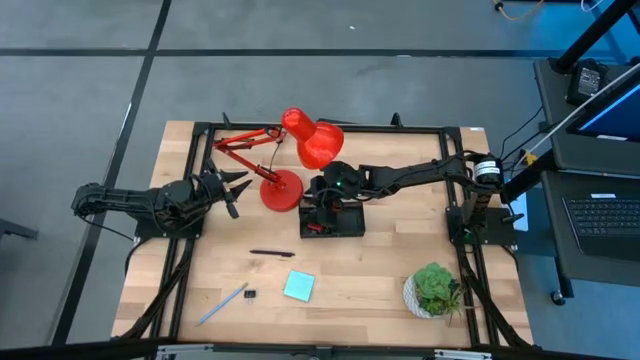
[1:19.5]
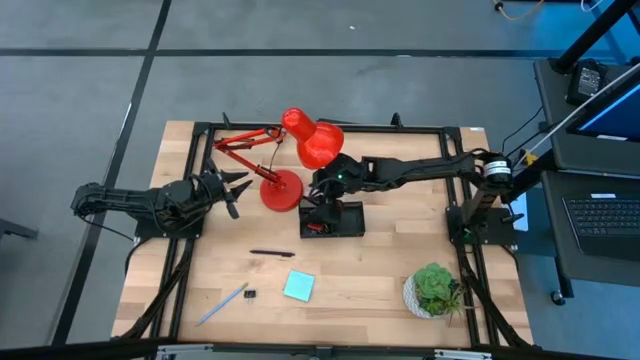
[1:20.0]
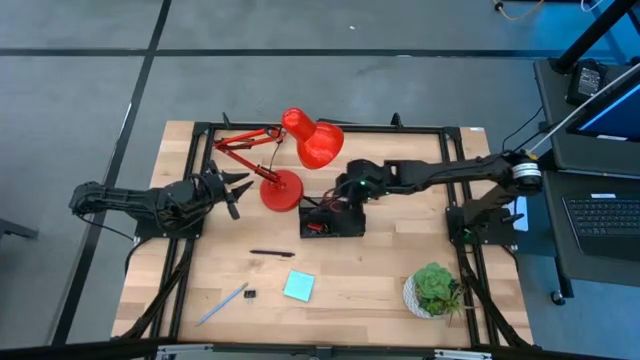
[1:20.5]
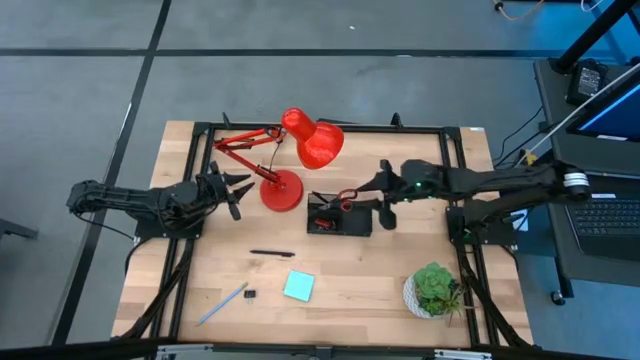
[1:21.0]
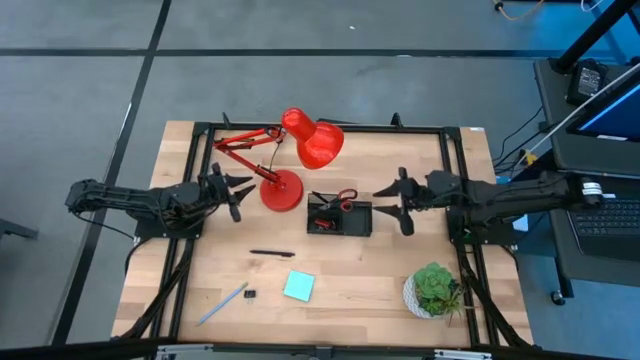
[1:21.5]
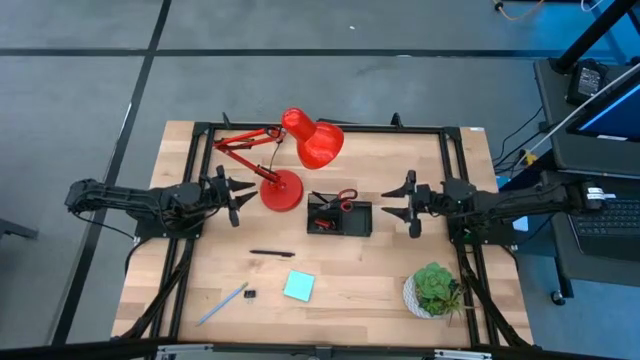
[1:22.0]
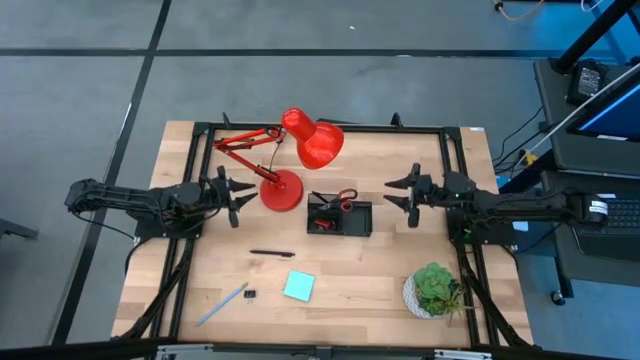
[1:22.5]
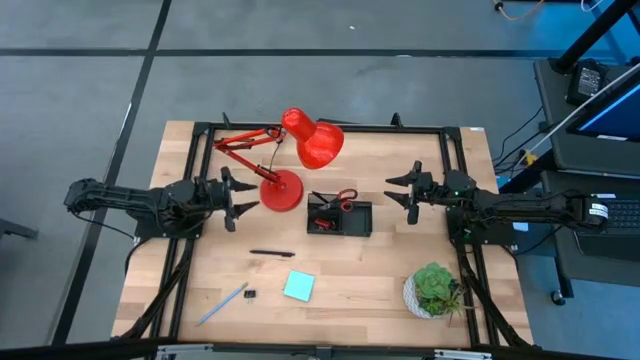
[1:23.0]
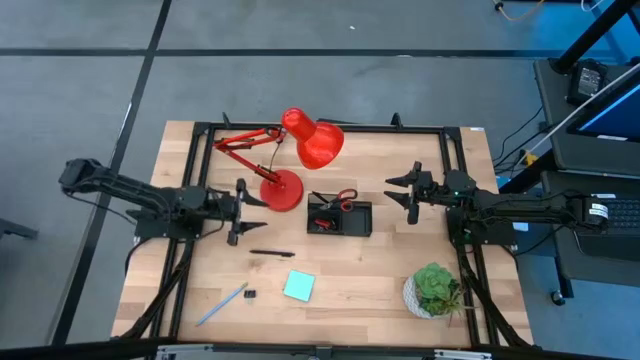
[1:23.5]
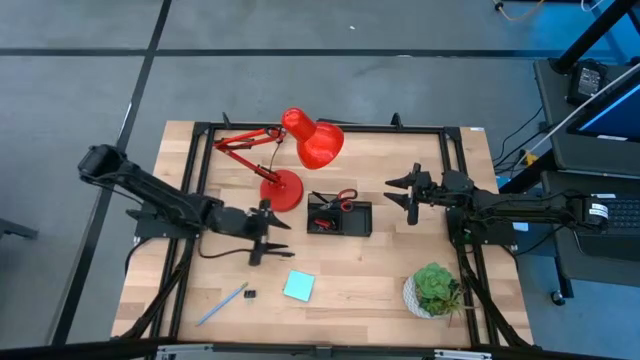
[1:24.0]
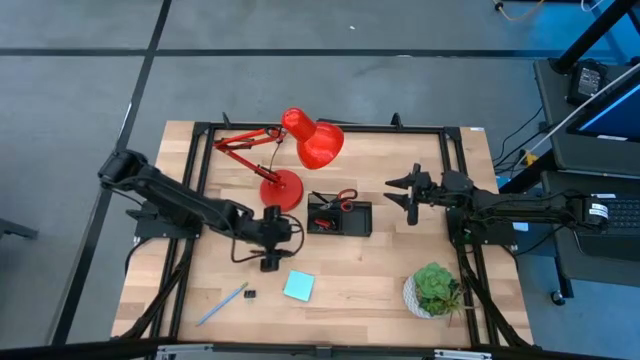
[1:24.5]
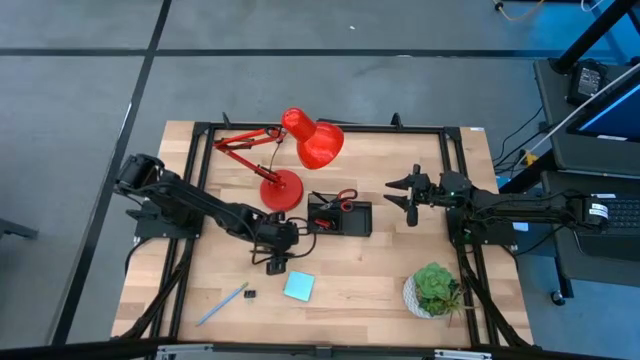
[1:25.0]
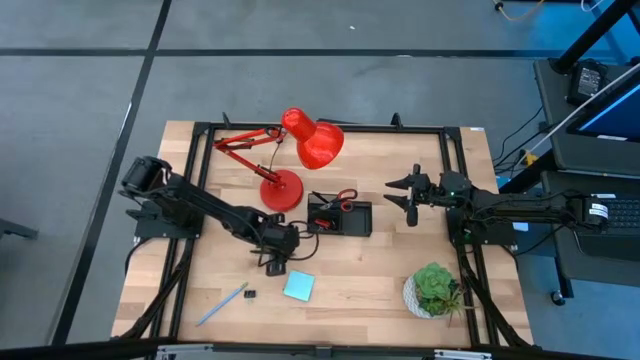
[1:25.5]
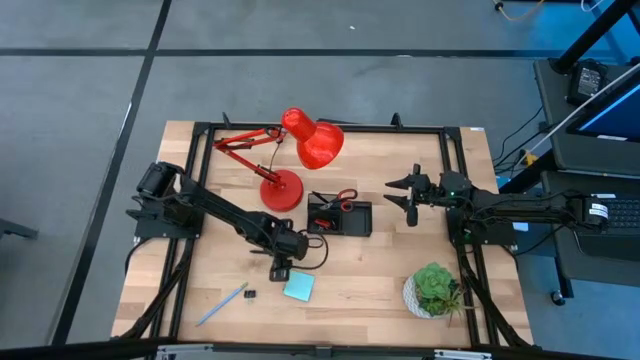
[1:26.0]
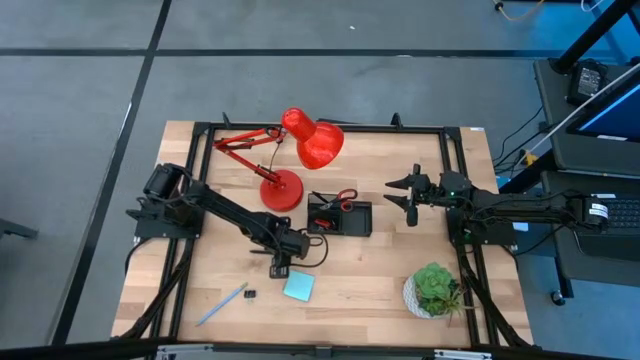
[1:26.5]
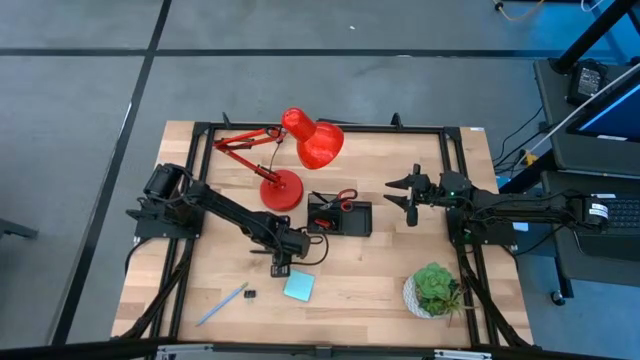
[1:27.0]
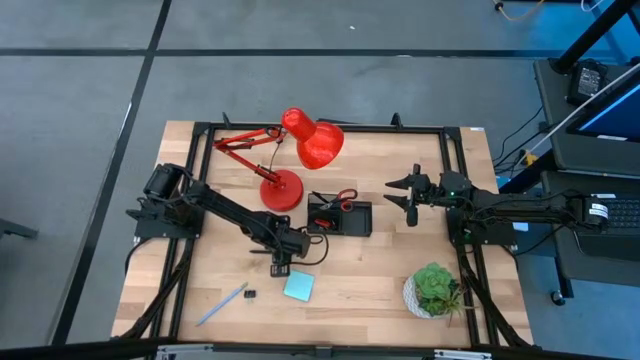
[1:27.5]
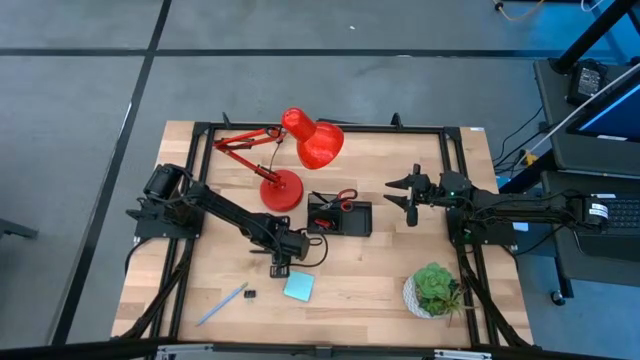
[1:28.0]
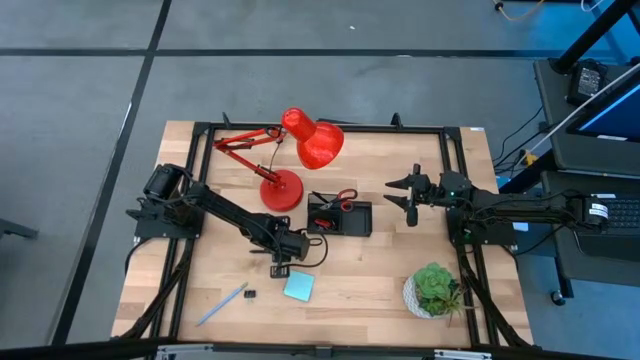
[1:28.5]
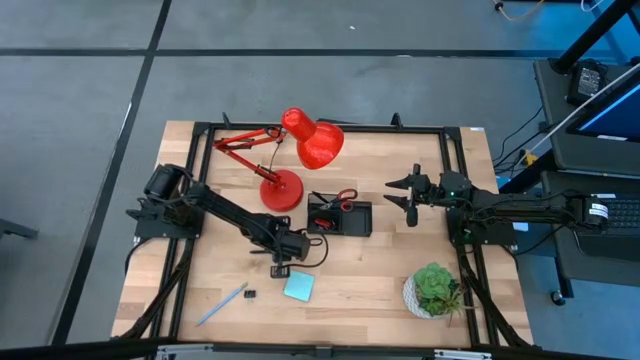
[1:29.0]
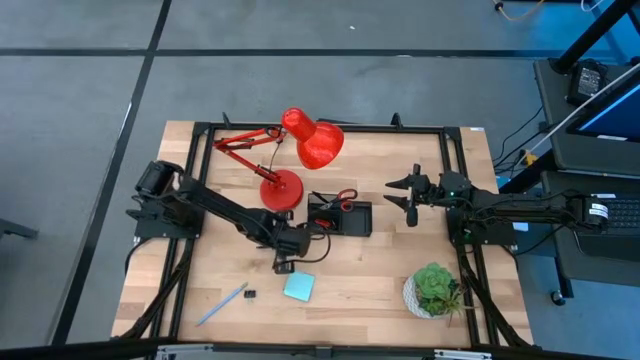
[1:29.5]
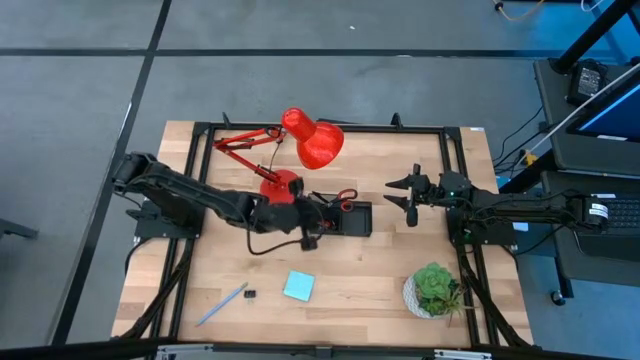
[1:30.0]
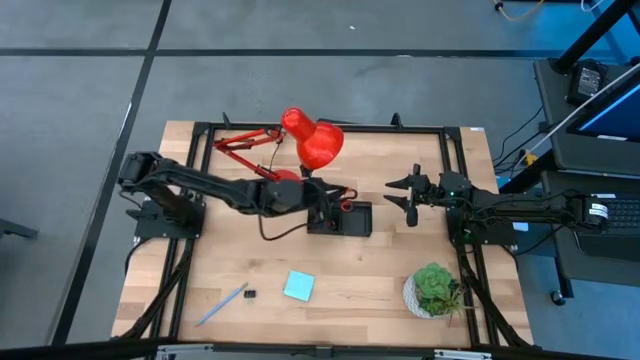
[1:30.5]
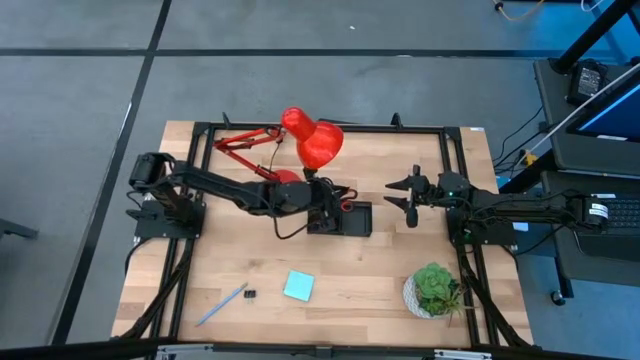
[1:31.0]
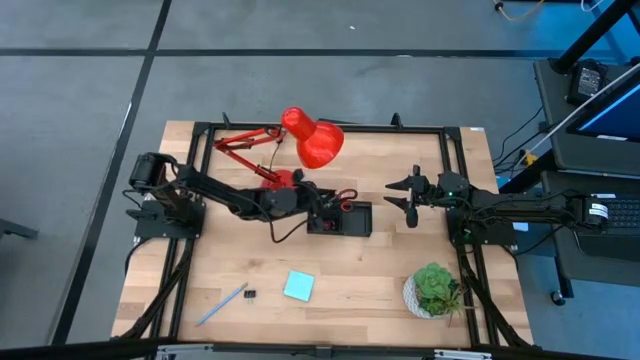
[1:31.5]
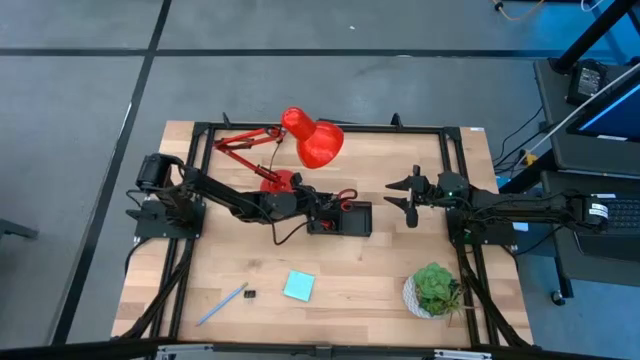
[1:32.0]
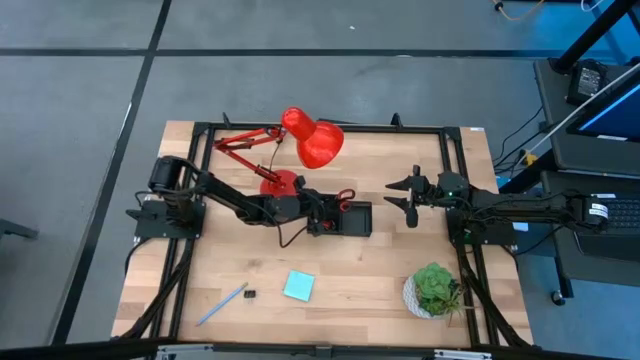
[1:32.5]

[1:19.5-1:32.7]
Task: Pick and place office supplies into organizer
Put the black pen into the black desk organizer

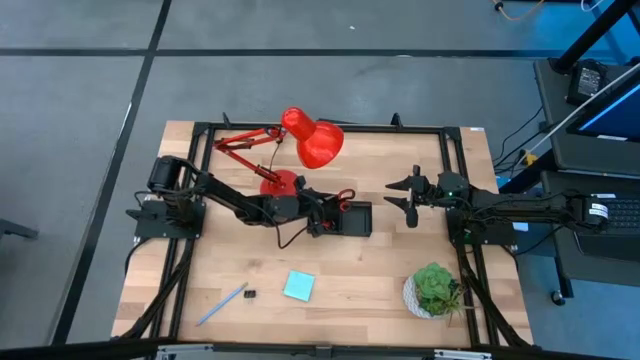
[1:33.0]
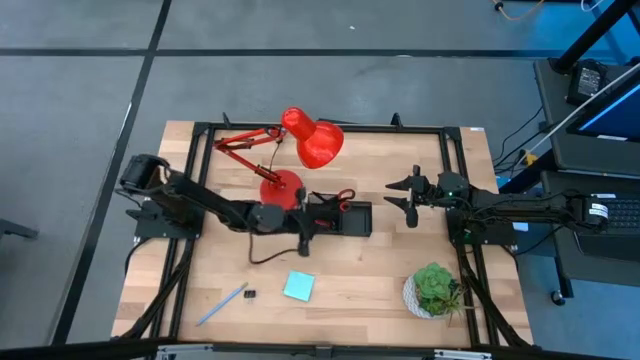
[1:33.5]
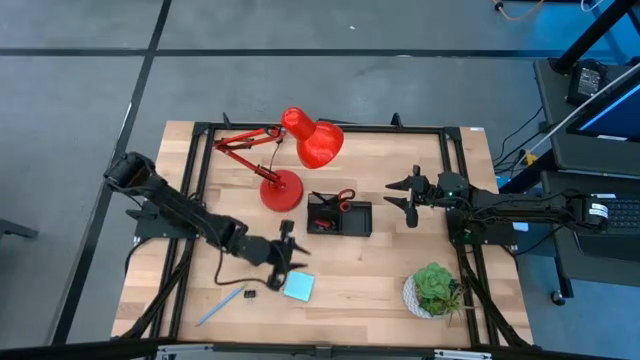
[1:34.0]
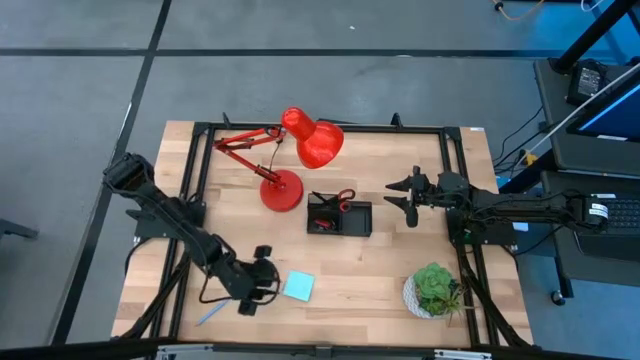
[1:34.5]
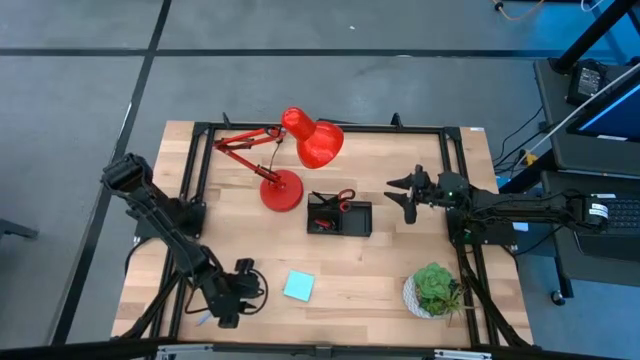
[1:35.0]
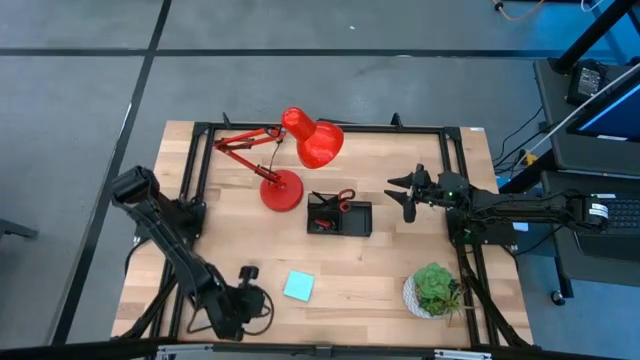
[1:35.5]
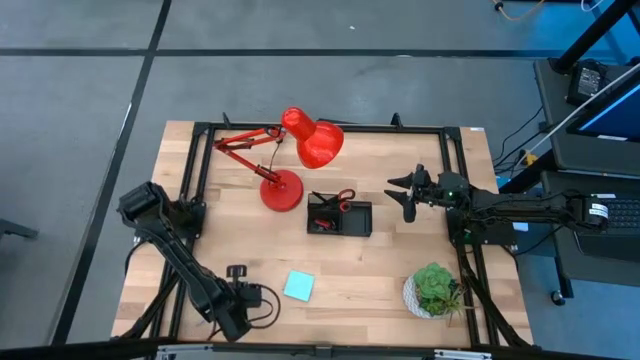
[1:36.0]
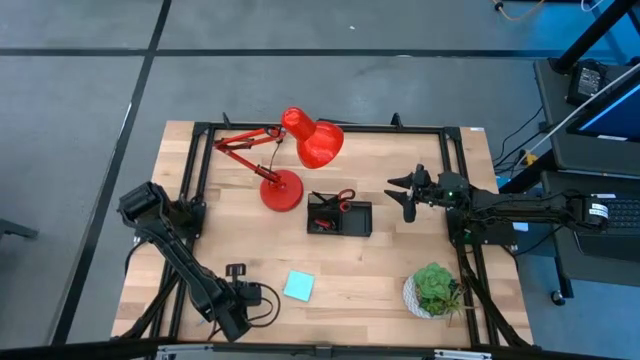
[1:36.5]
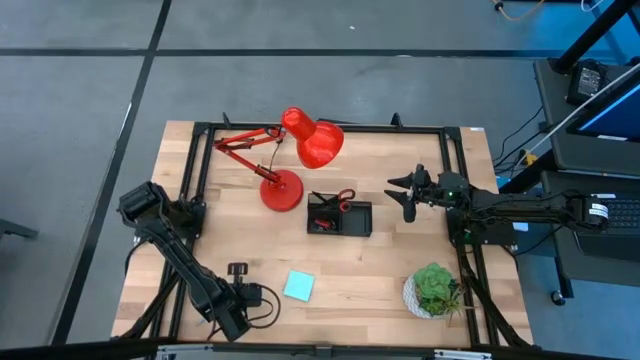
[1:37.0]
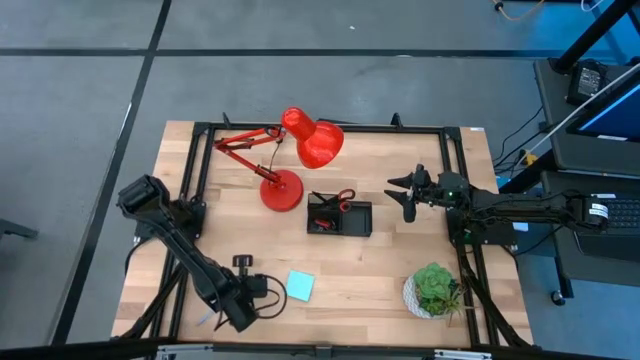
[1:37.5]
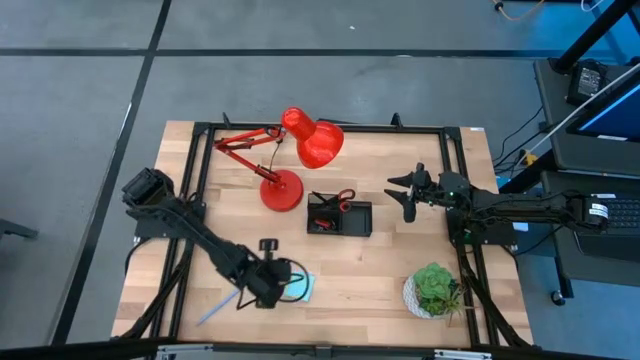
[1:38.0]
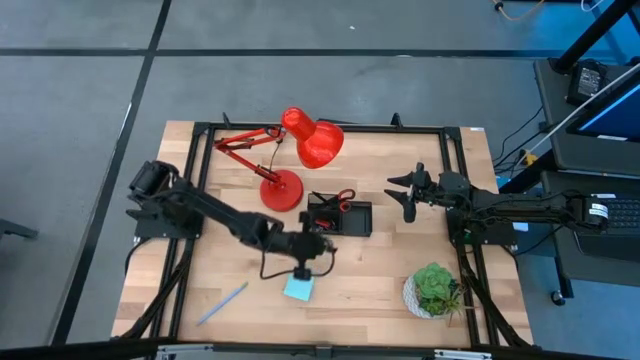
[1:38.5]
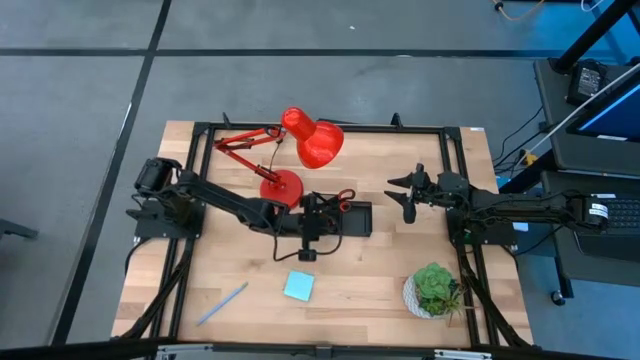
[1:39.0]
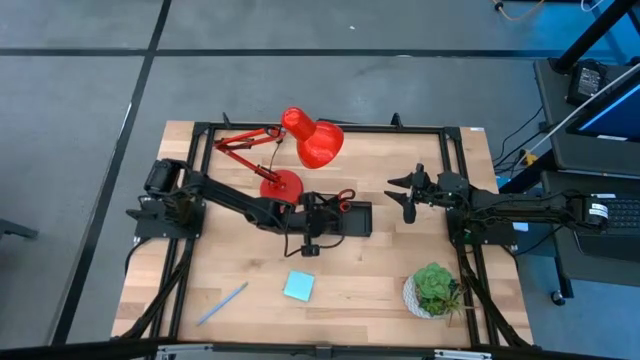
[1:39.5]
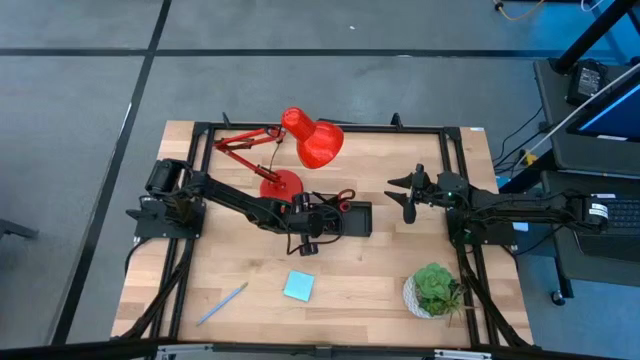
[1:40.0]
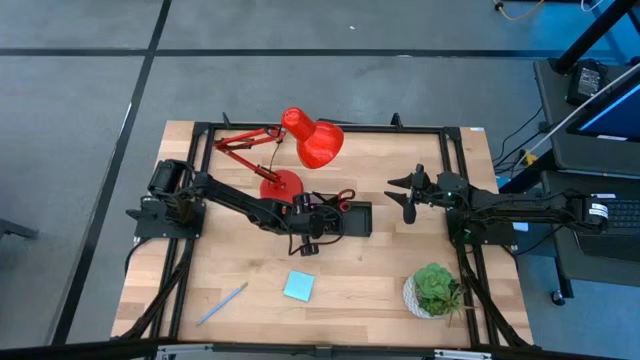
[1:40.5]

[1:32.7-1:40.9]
Put the black binder clip into the black desk organizer
